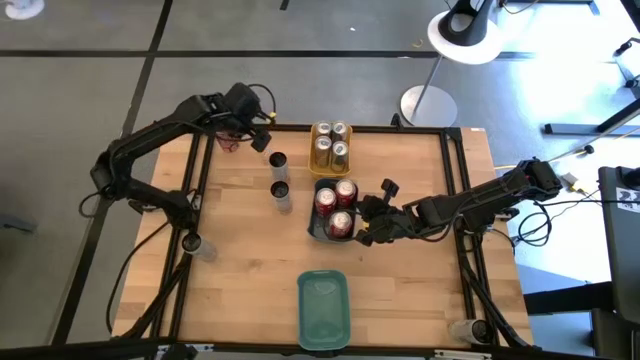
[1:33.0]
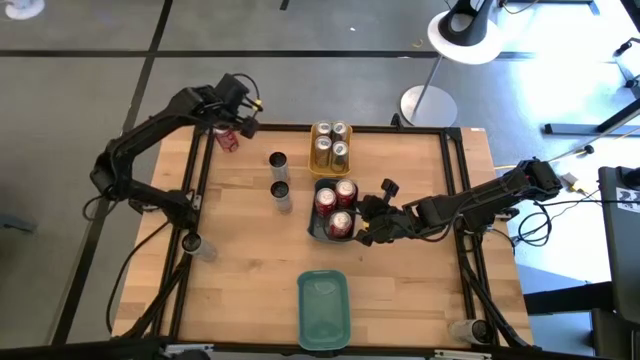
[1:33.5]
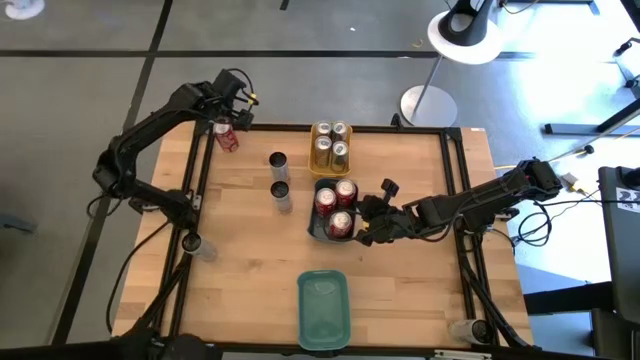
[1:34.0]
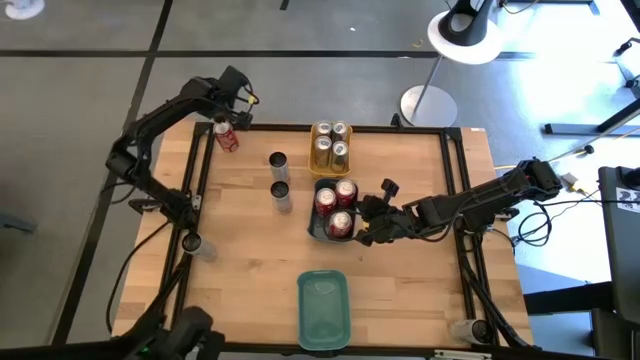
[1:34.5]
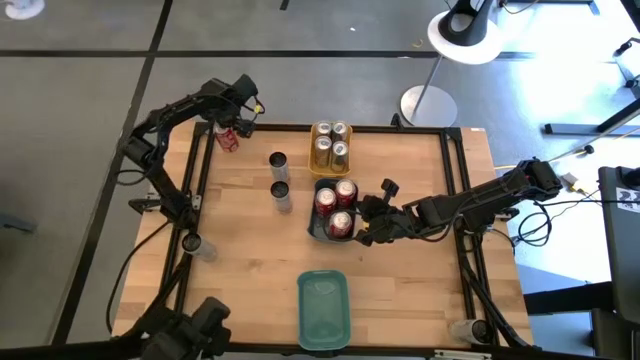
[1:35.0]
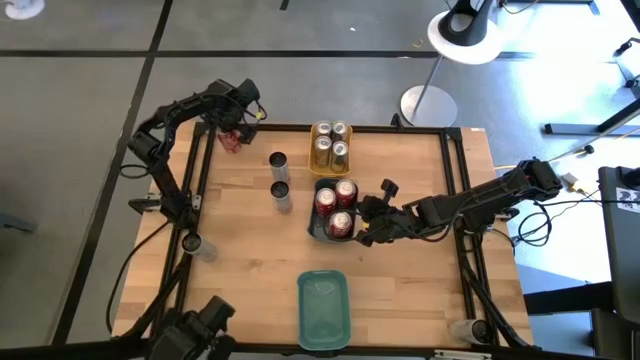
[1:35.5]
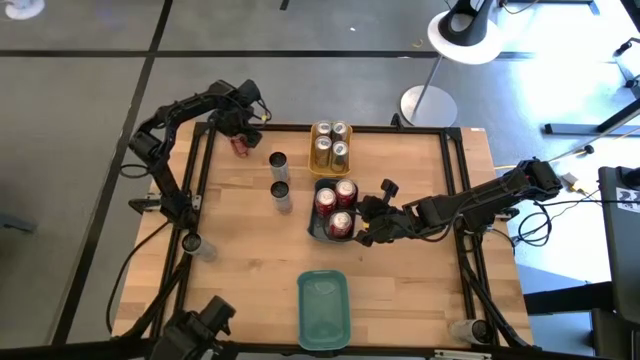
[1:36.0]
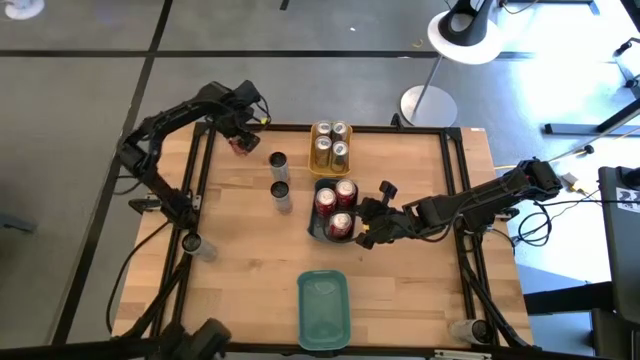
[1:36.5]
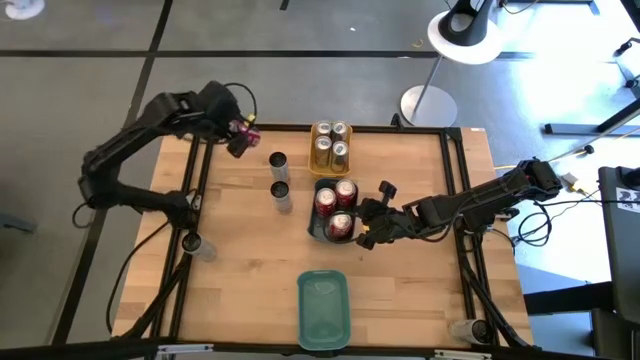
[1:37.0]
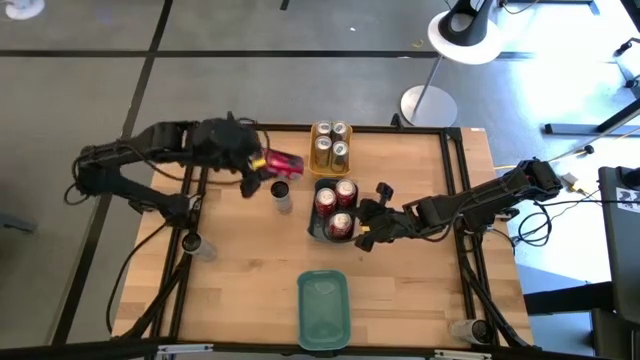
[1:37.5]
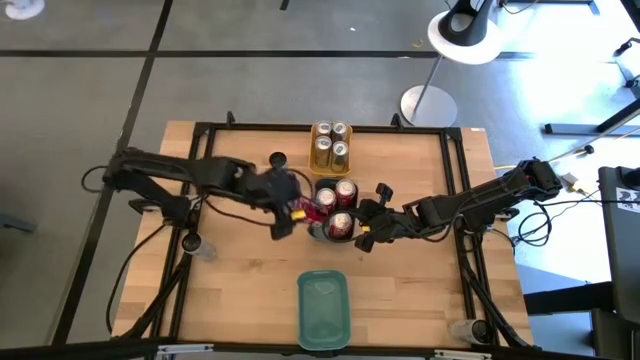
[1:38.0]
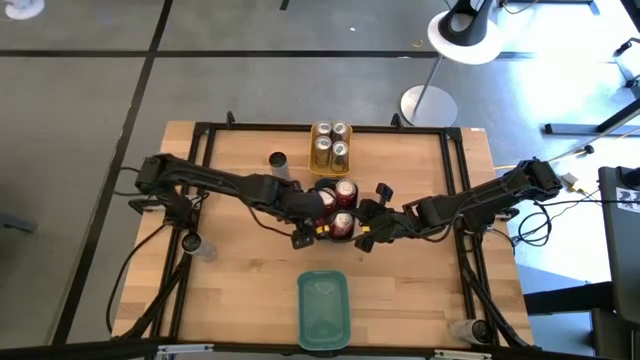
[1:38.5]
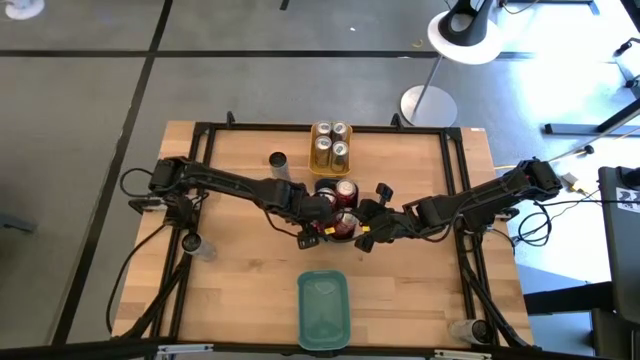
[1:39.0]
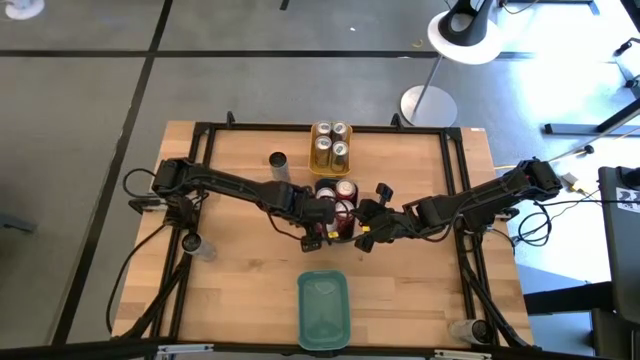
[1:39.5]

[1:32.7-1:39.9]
Task: Sort soda cans
Put the red, white soda can into the blue bin

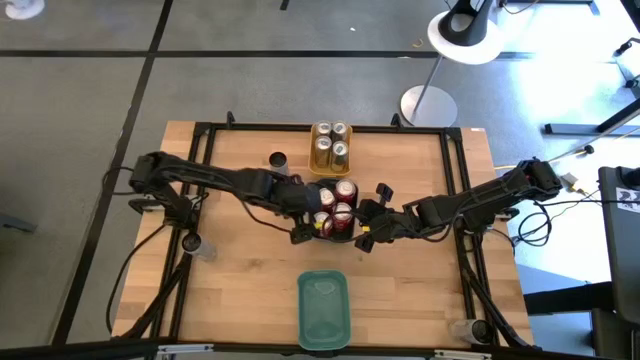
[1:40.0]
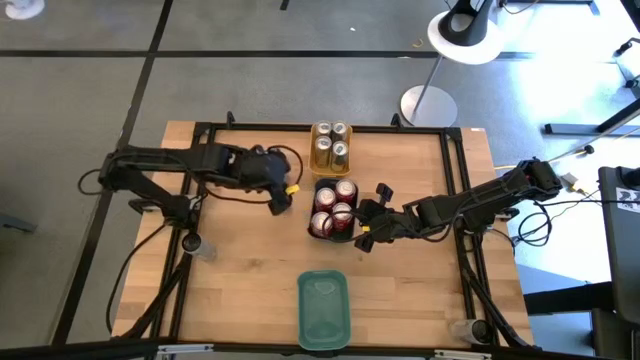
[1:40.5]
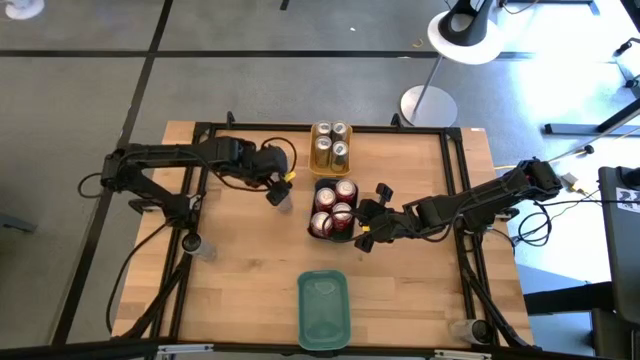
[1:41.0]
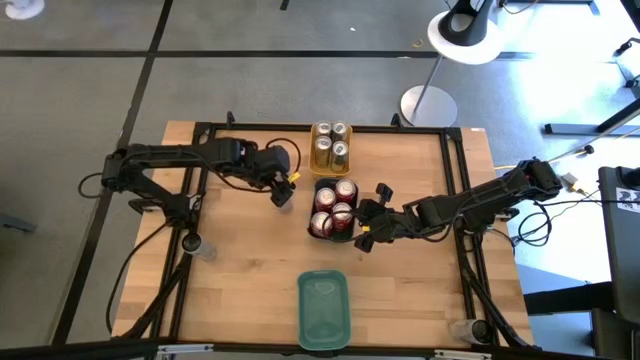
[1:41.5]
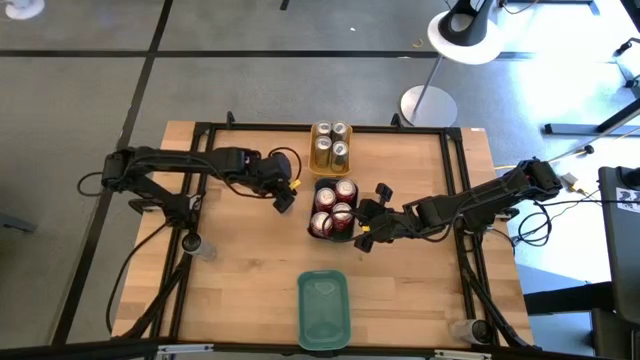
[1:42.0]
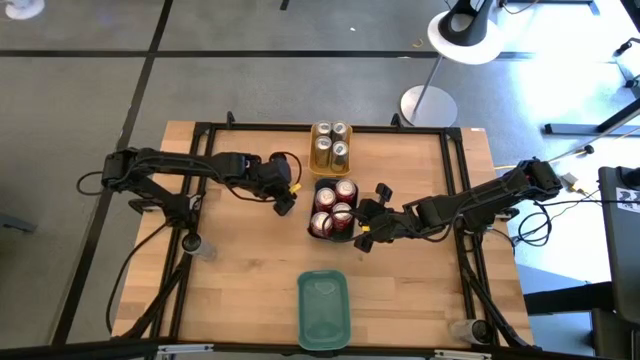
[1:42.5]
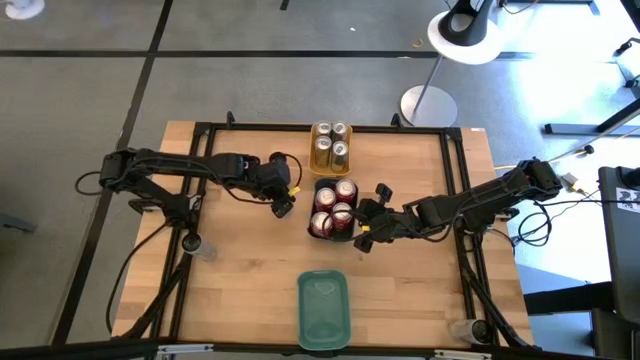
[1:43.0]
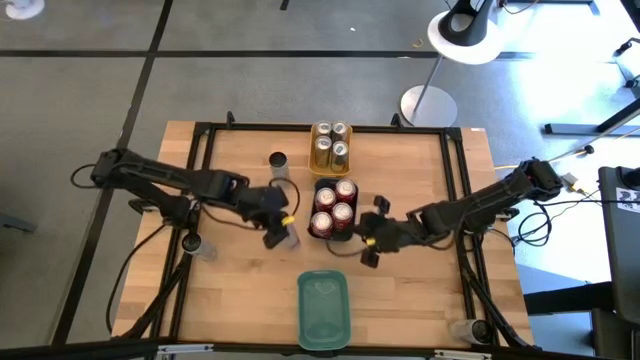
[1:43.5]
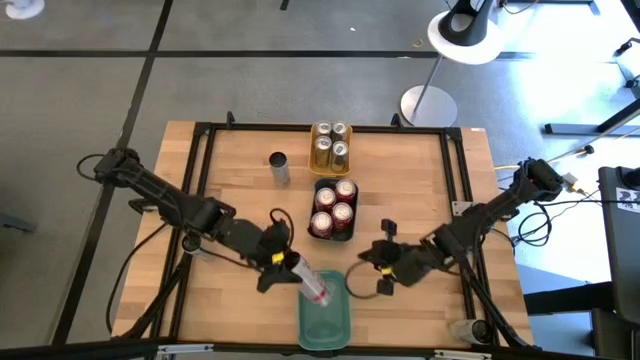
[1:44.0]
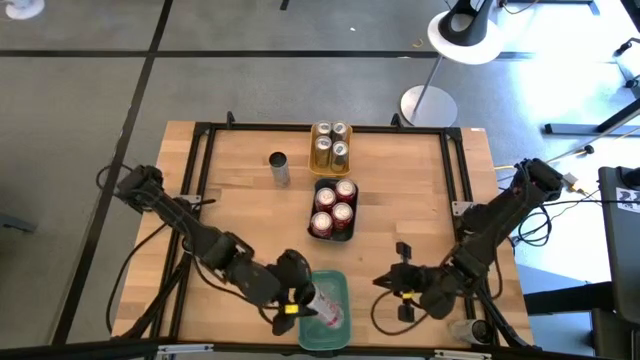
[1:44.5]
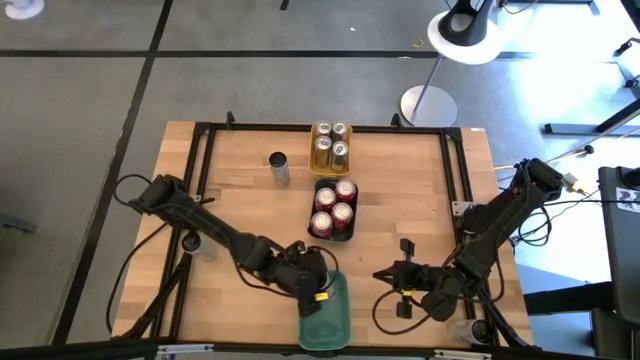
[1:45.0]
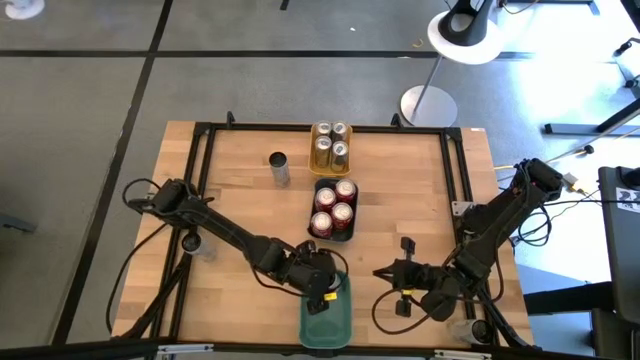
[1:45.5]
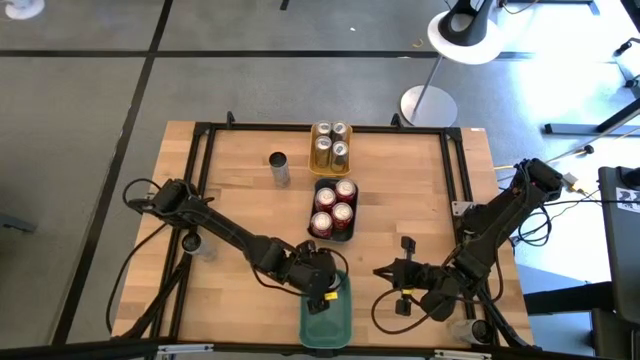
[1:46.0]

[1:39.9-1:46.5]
Put the middle top white, pink soda can into the green bin

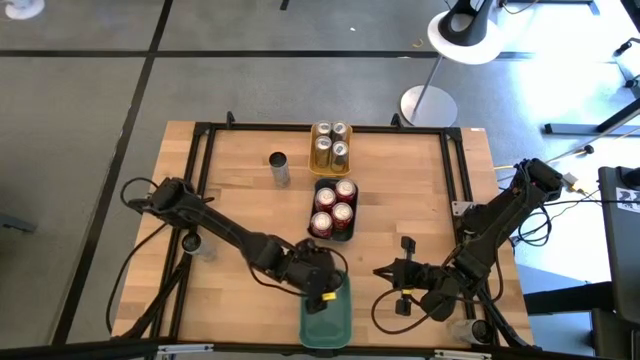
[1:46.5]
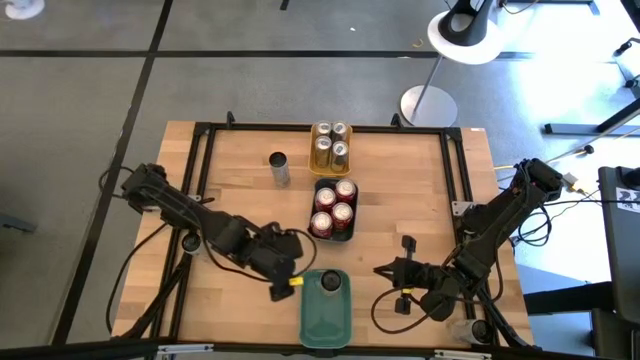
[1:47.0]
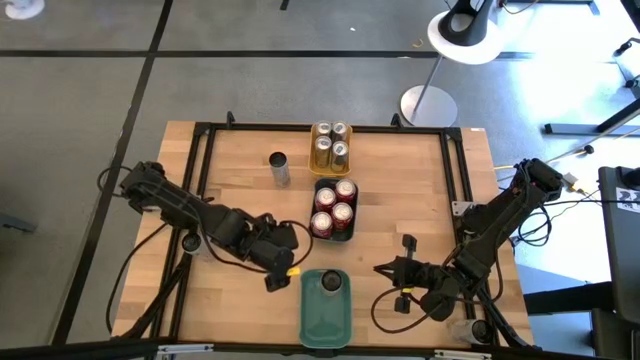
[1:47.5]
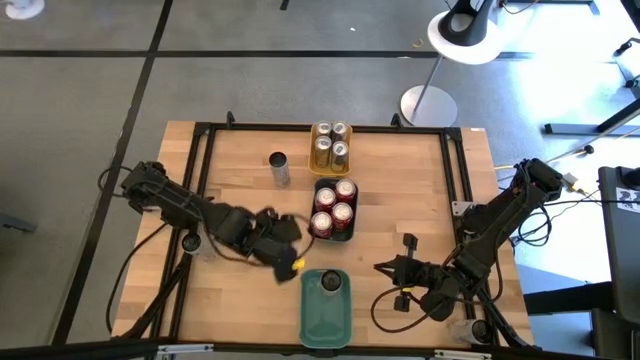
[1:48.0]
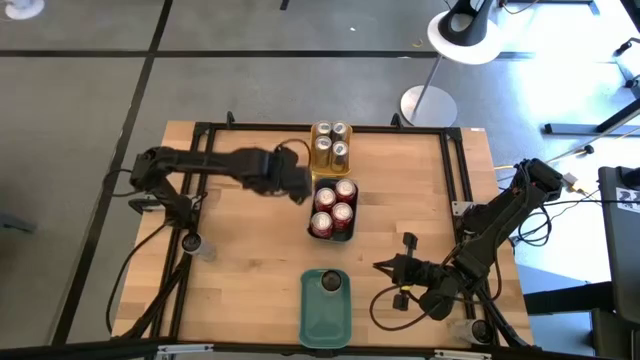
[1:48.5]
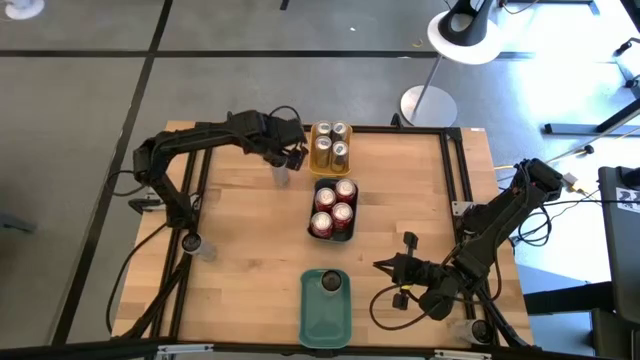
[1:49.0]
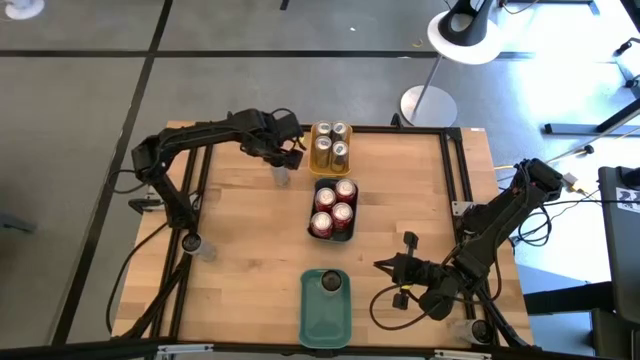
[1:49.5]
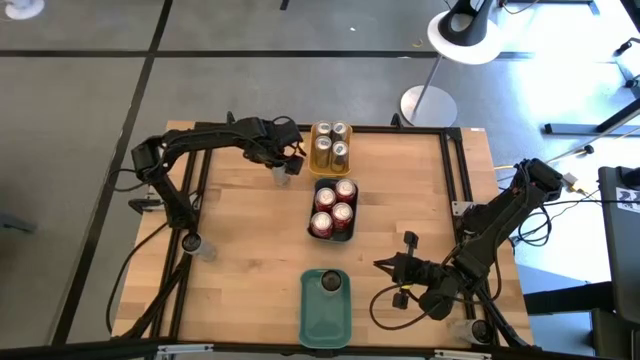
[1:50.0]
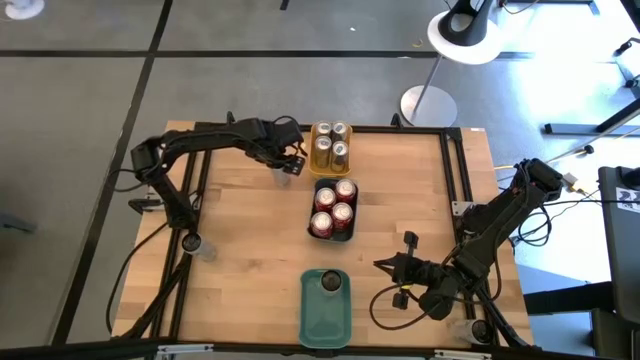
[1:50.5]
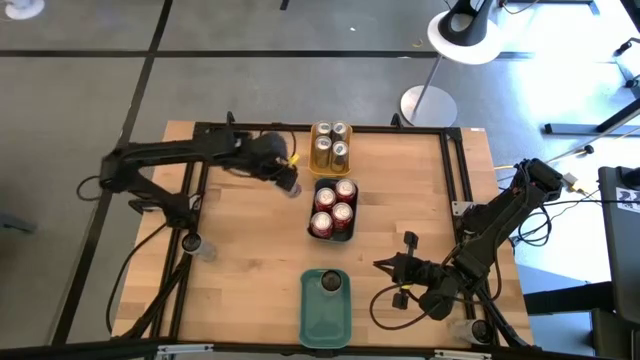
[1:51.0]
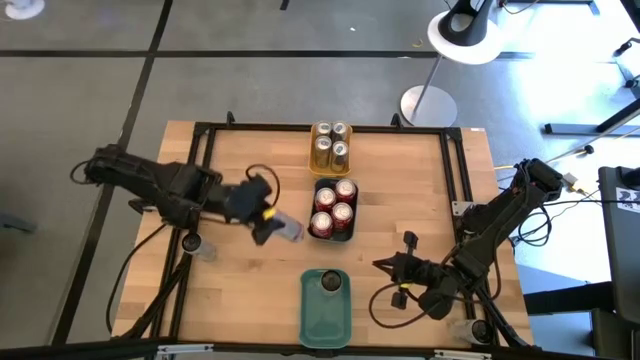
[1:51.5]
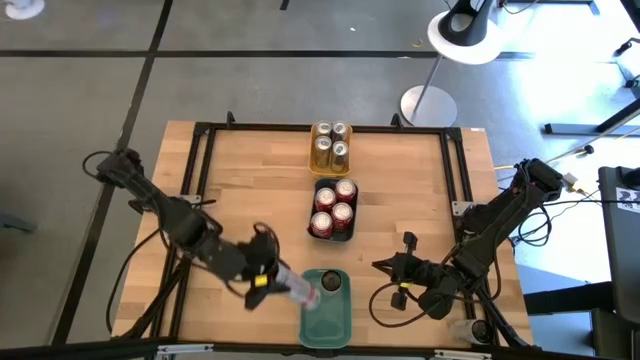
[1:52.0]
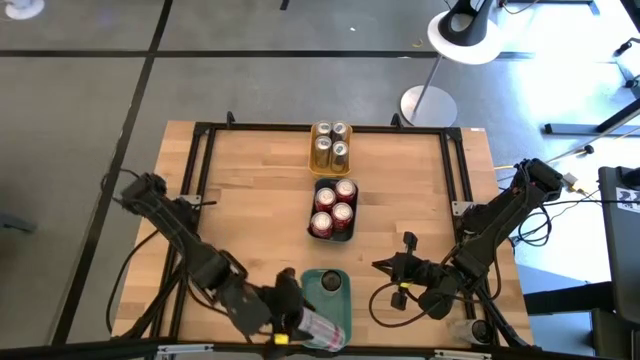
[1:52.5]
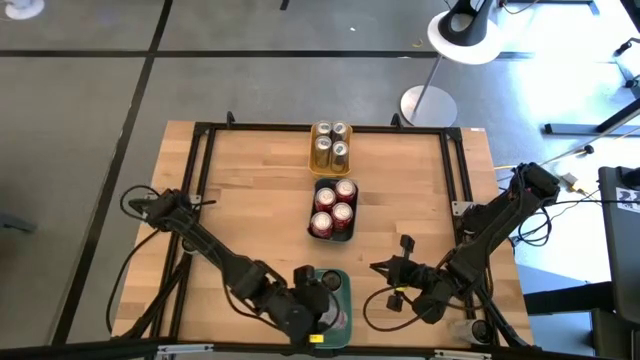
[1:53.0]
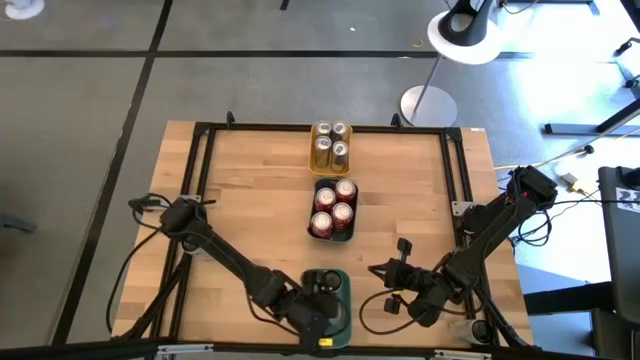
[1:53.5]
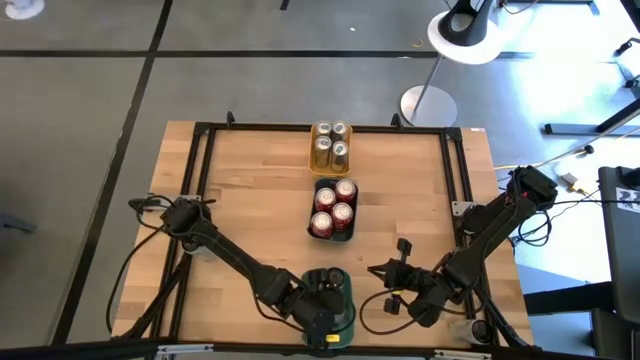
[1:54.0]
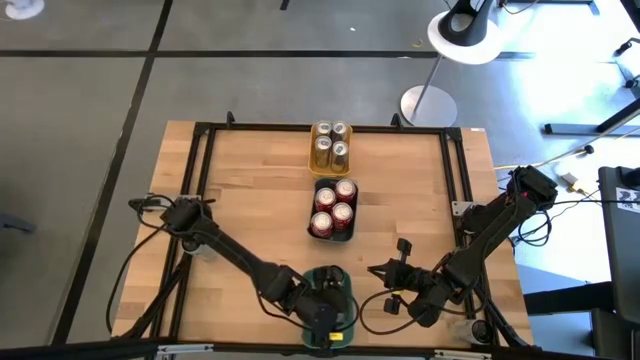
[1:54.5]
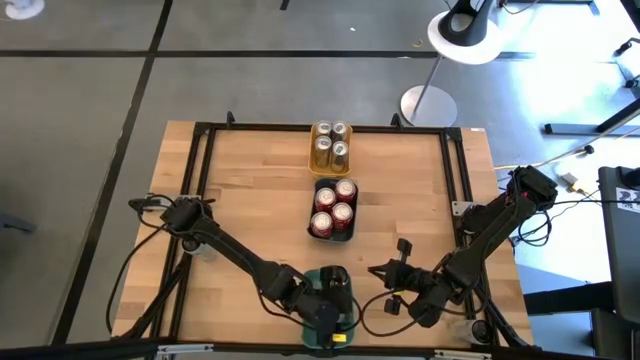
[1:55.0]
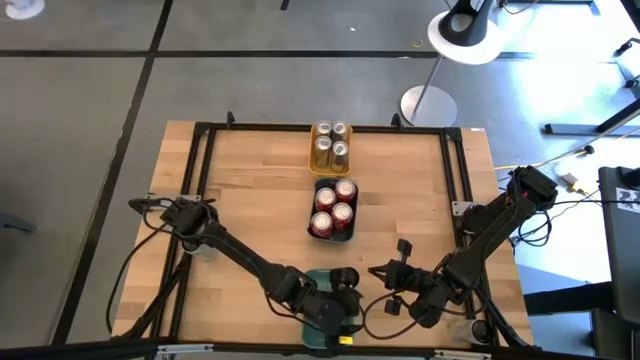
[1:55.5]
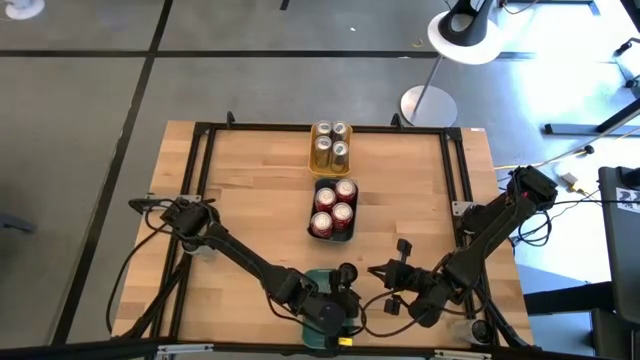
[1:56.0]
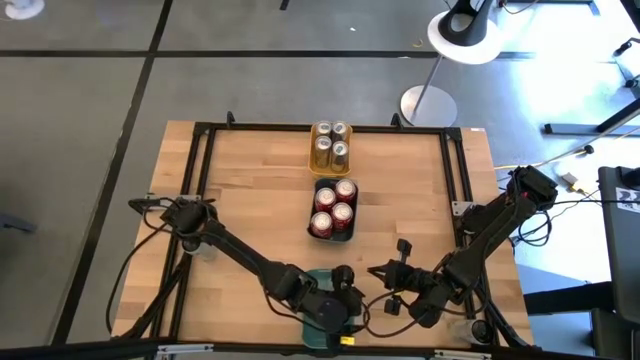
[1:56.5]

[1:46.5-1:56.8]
Put the top white, pink soda can into the green bin
